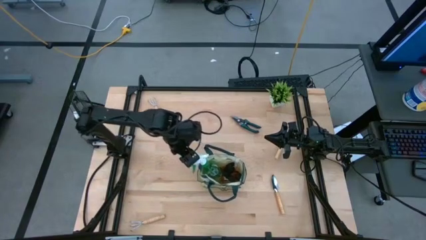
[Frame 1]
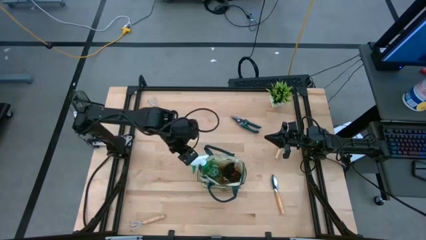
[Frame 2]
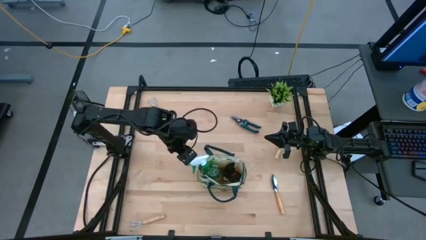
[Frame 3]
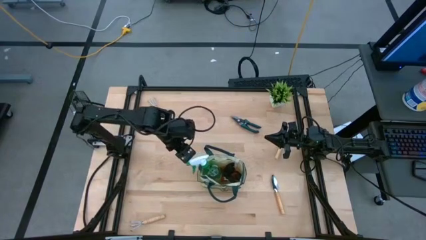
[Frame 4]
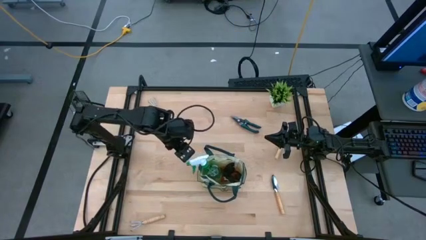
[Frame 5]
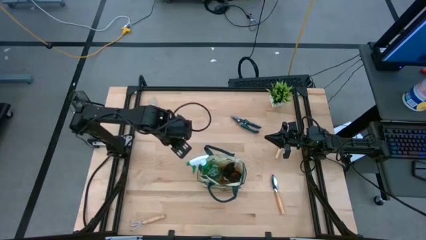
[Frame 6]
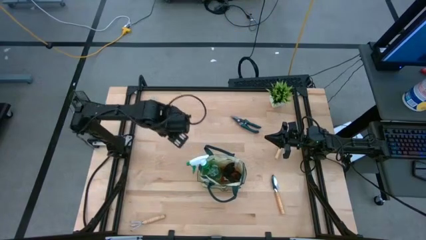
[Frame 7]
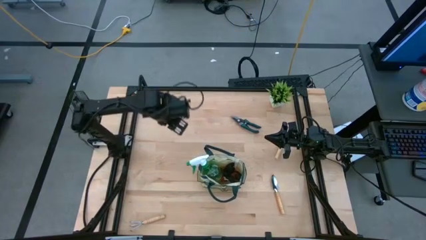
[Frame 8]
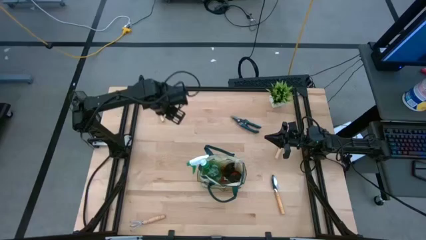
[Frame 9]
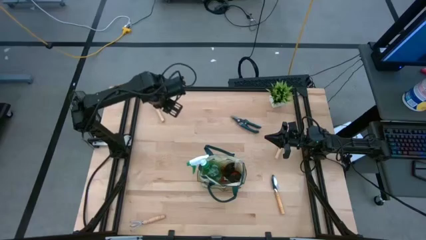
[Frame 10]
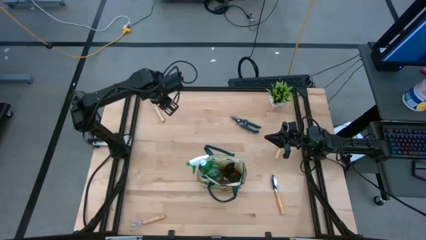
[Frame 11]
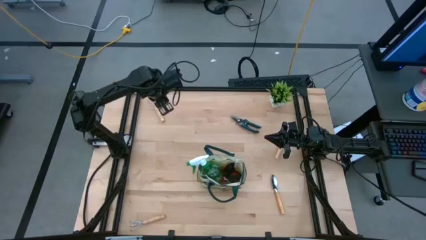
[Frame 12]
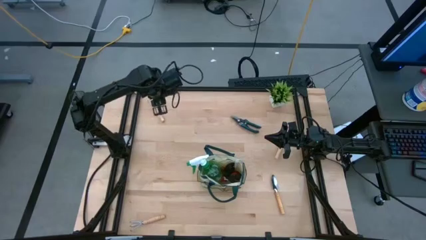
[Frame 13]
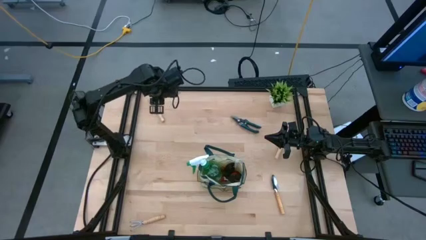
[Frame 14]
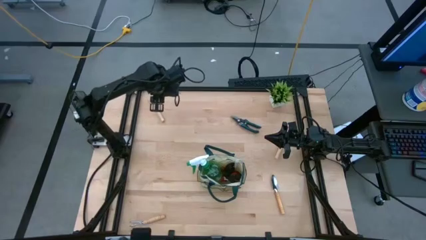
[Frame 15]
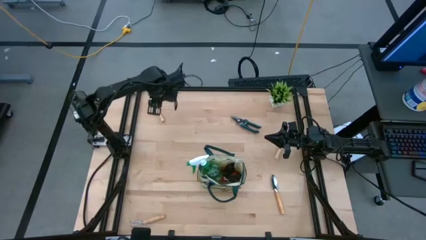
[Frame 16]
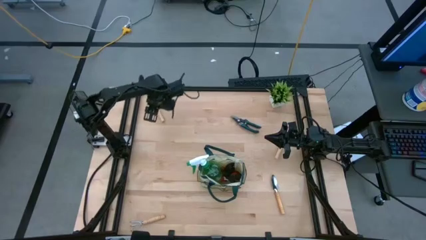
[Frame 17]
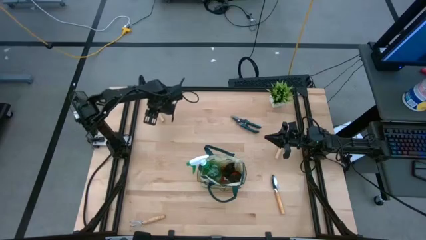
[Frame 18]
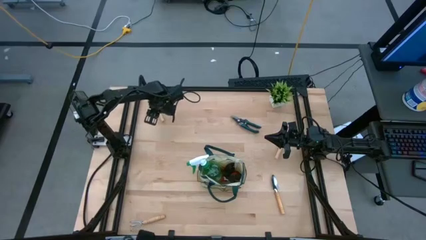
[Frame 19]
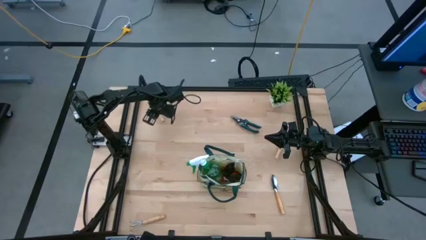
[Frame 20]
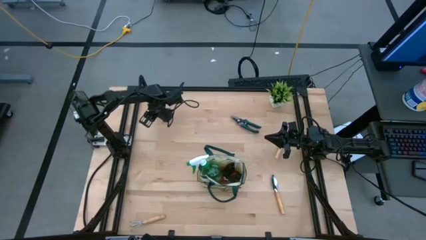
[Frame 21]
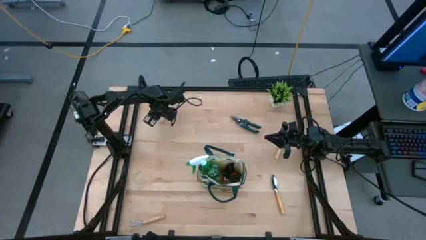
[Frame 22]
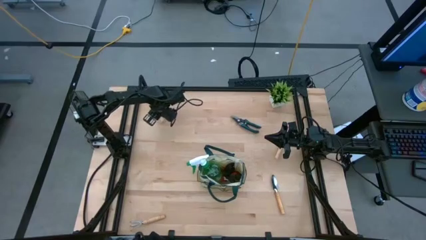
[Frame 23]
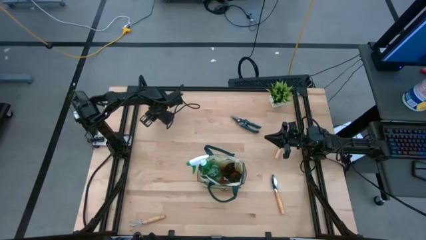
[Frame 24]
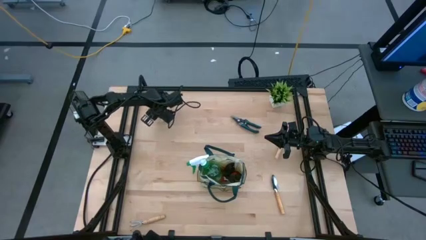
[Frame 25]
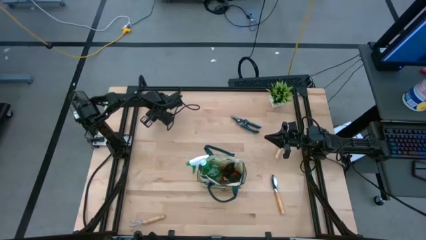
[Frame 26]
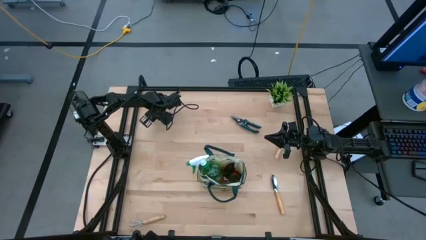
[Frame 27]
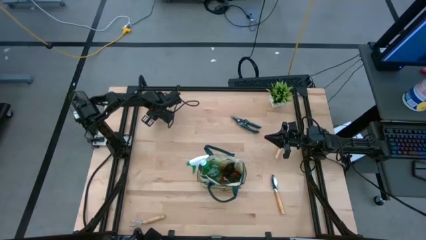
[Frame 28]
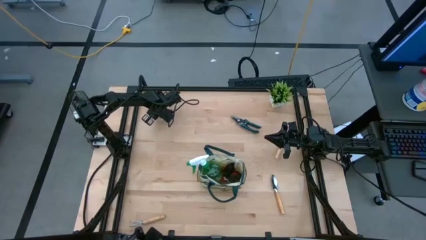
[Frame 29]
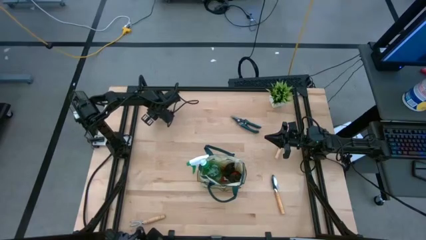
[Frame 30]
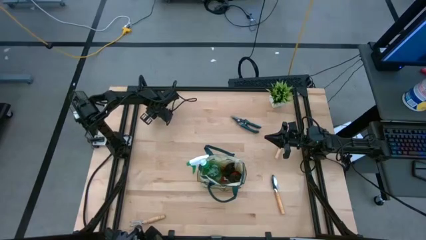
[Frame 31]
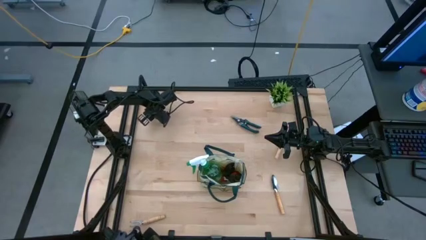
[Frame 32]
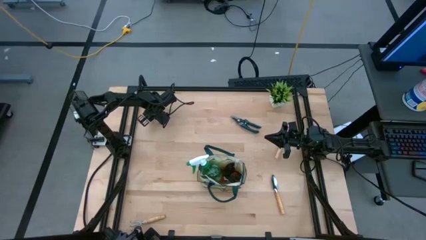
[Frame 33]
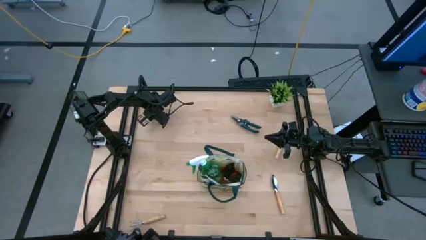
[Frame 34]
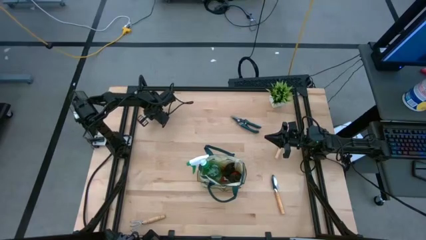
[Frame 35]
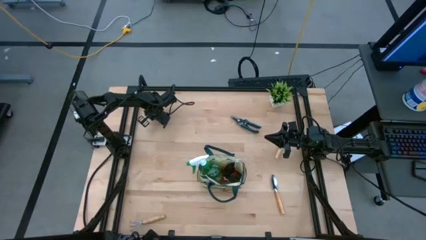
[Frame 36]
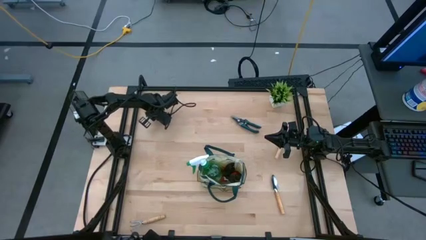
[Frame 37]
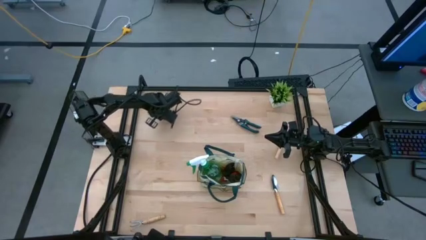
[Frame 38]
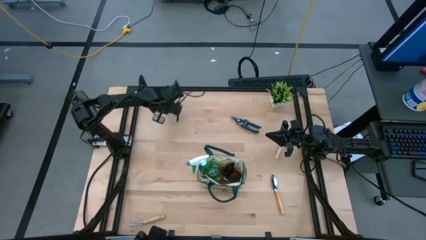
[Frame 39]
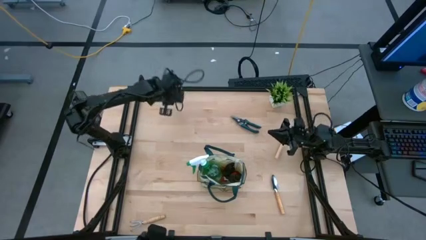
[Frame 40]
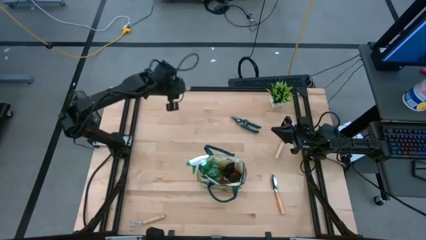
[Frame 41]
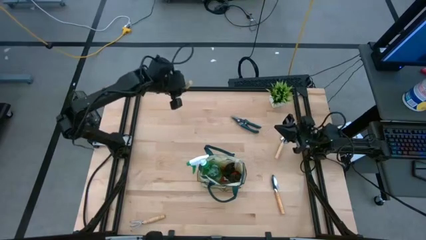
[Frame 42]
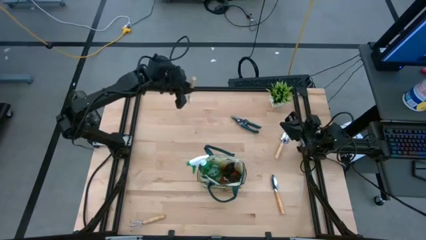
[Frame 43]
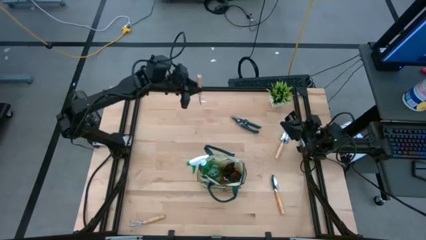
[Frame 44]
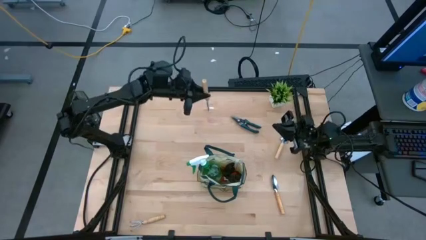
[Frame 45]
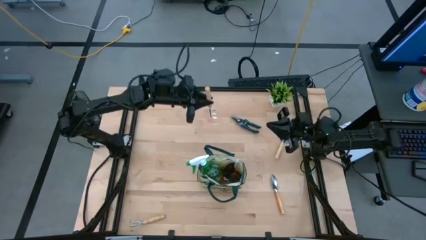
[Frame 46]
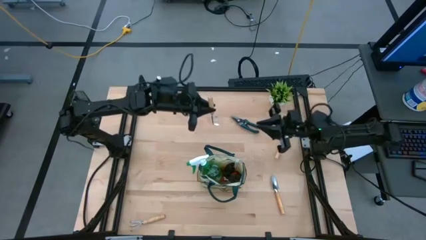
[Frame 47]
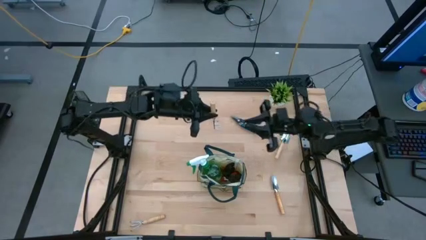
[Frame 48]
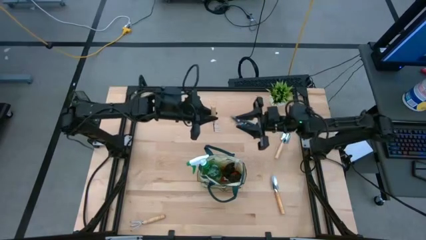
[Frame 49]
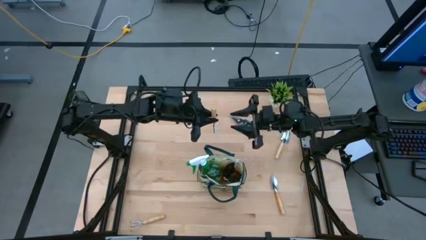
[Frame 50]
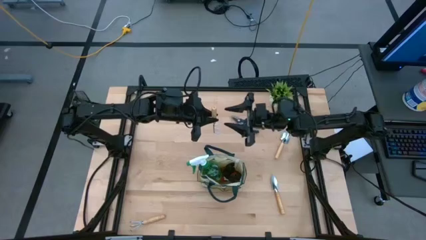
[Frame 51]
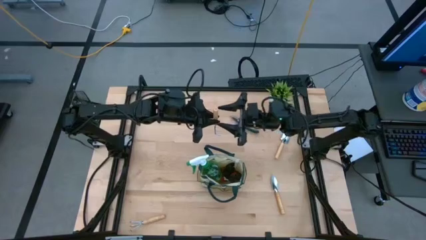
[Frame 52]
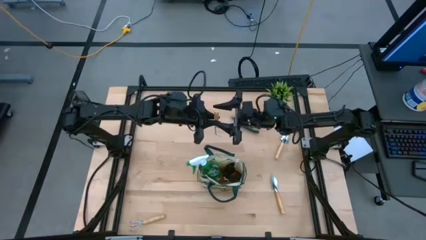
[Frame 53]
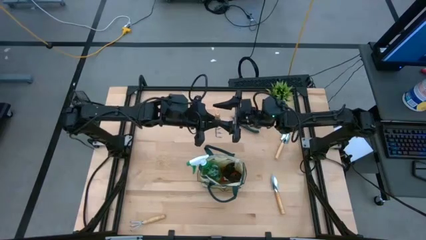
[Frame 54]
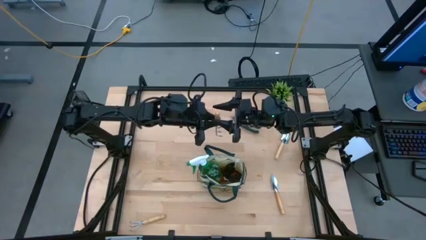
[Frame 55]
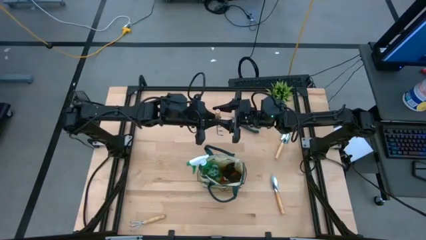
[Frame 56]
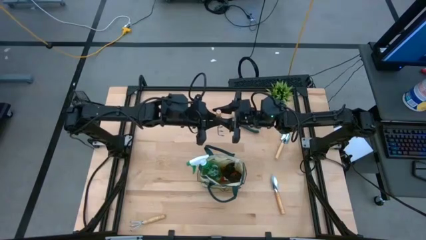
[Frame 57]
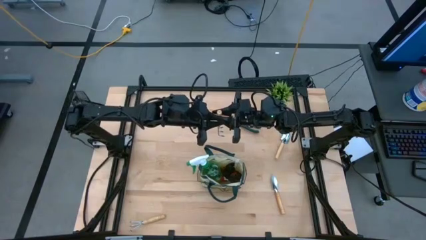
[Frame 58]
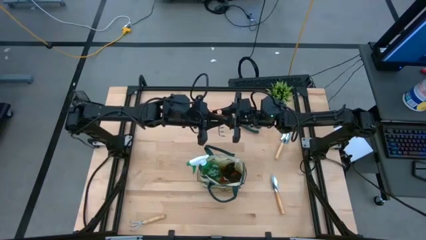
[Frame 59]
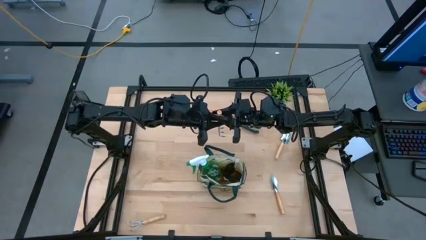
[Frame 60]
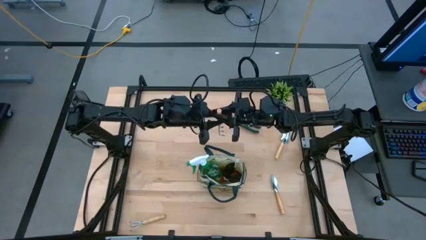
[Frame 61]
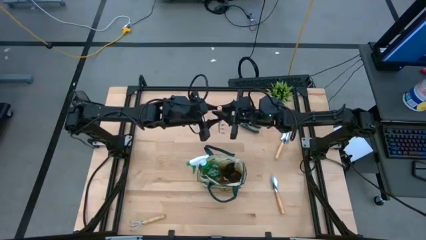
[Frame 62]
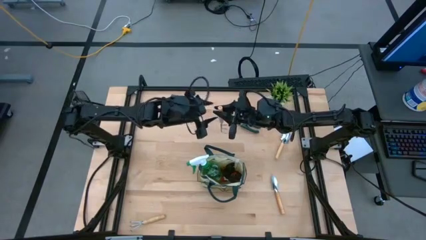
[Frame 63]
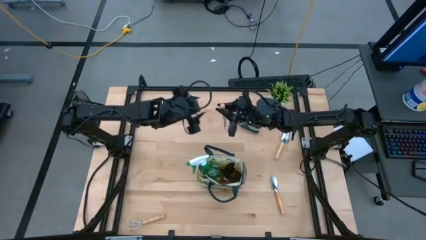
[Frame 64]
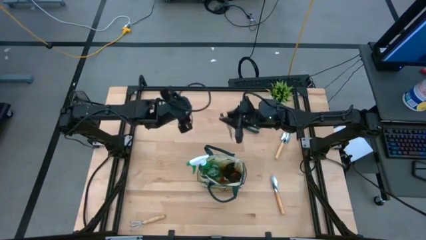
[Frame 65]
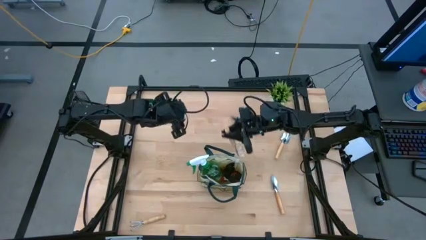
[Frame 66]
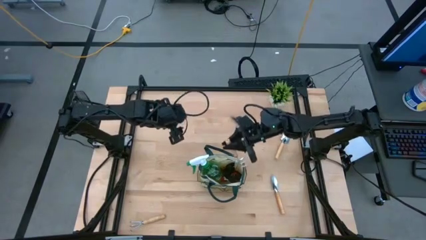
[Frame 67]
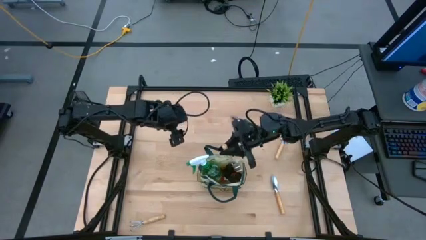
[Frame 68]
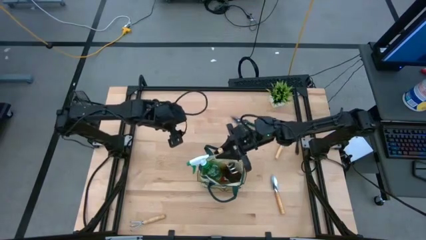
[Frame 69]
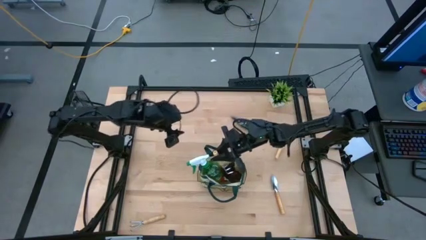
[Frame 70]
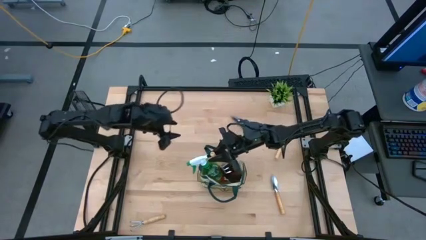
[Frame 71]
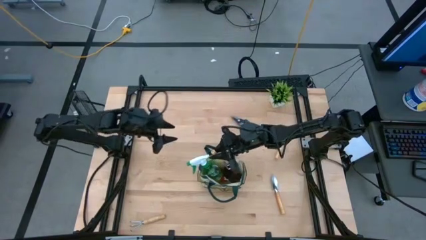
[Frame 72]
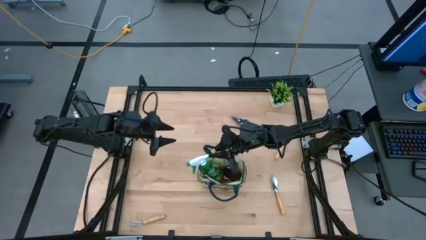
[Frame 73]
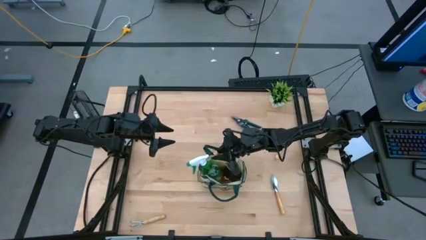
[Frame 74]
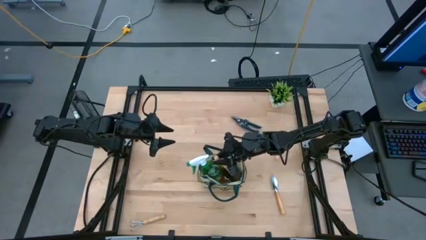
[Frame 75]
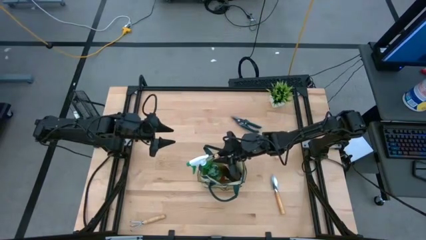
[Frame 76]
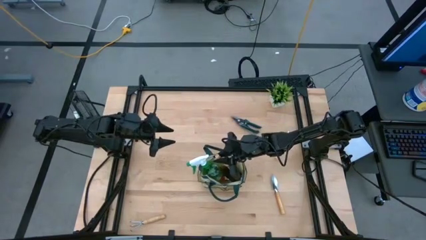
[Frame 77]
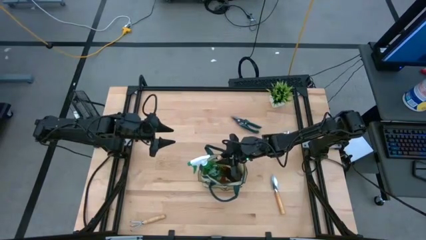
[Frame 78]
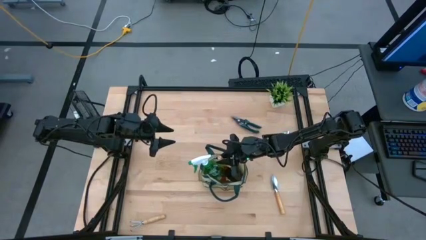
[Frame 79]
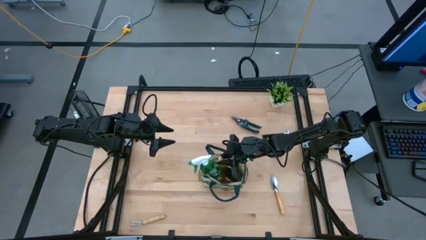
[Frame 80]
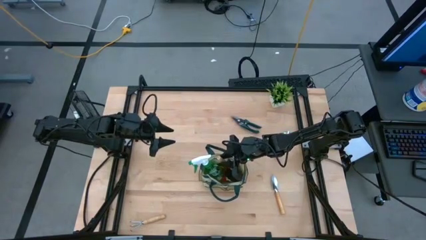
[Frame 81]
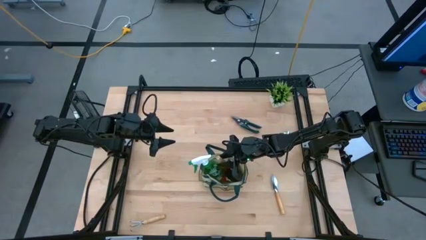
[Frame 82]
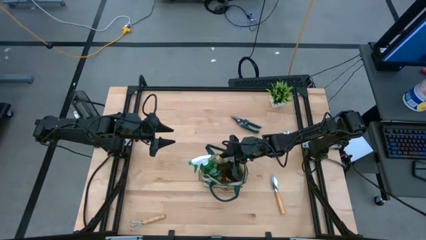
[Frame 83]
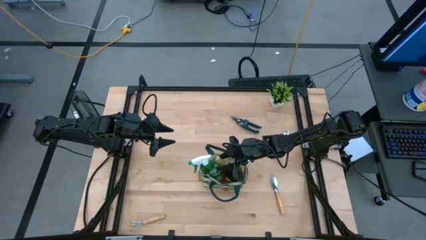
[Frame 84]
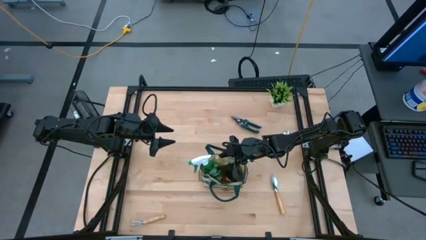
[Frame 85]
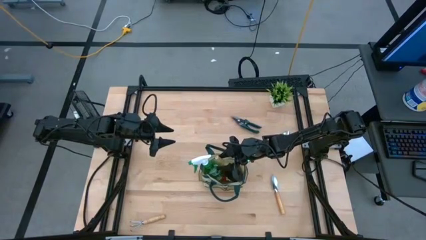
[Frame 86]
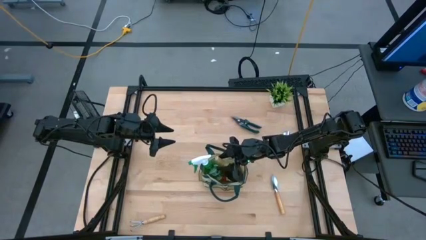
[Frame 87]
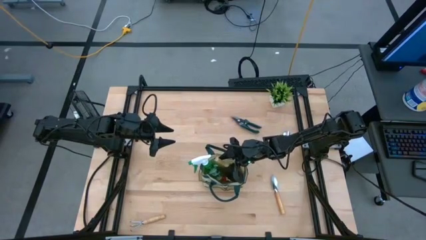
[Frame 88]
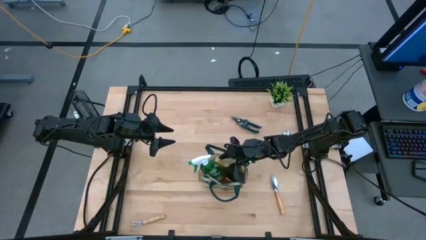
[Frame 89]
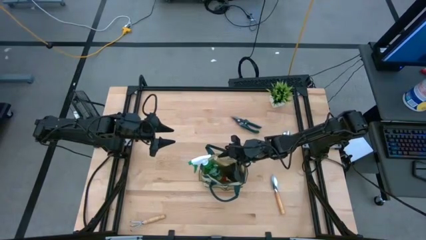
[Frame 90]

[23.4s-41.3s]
Task: Pick & Place Garden tools in Gardening bag
Put the top brown hand rake into the gardening bag
